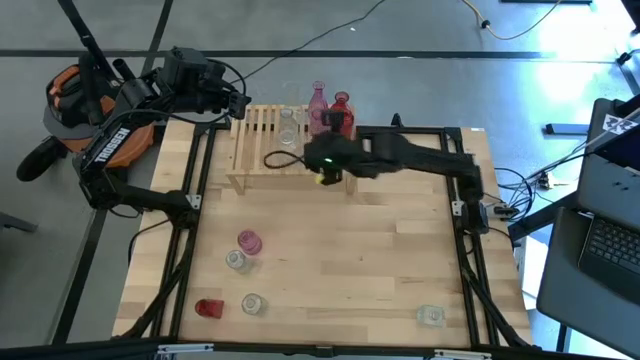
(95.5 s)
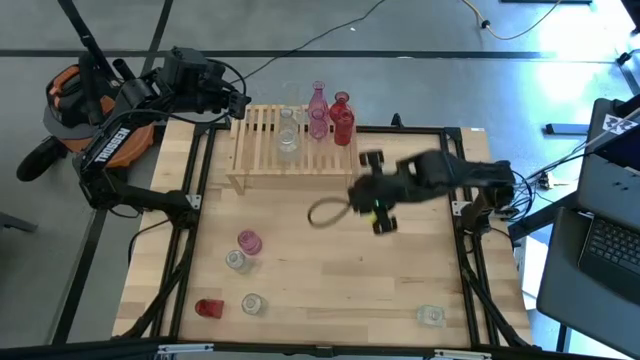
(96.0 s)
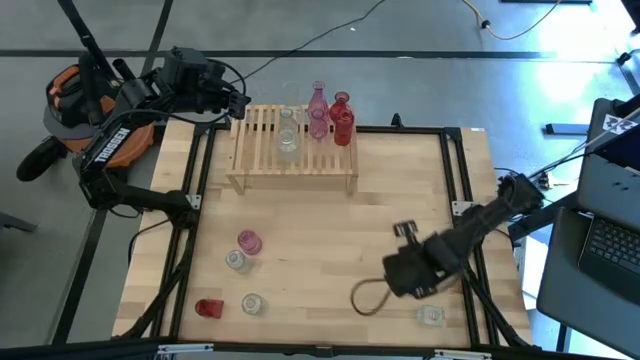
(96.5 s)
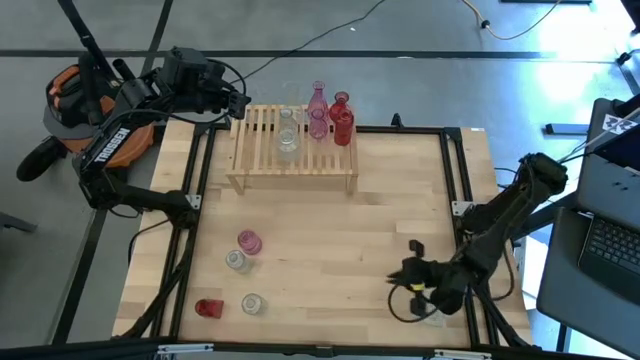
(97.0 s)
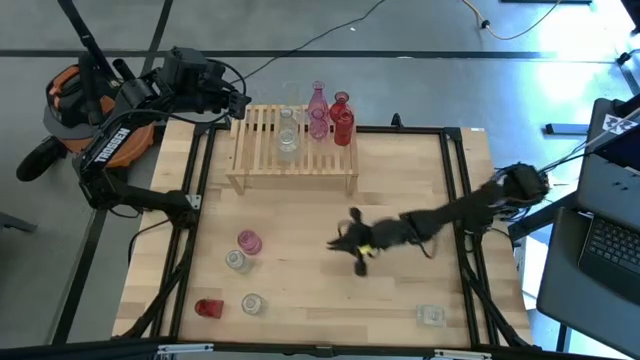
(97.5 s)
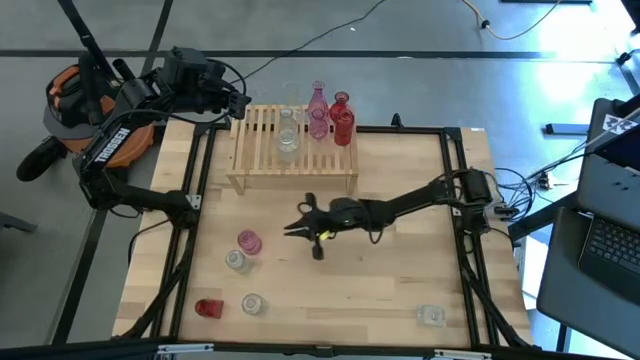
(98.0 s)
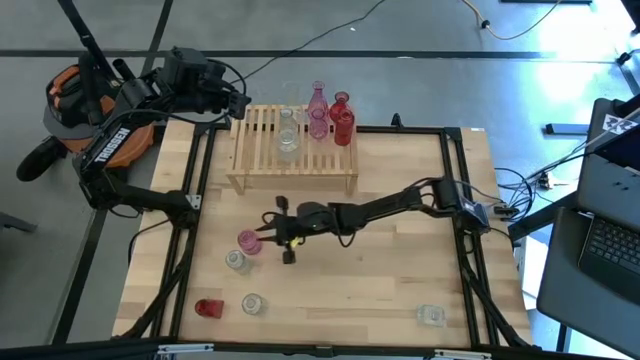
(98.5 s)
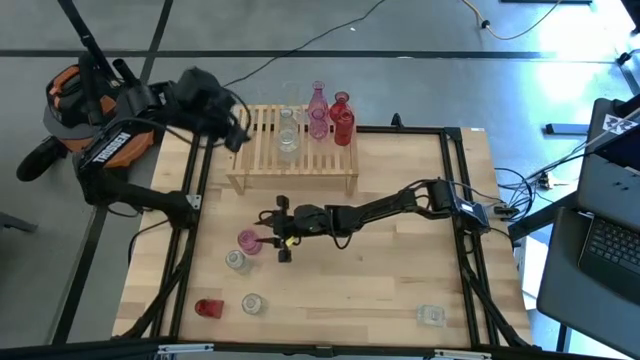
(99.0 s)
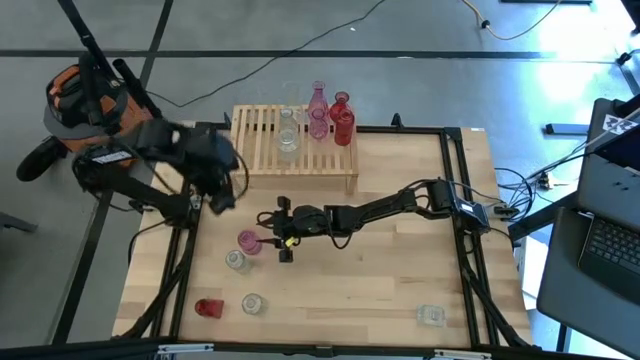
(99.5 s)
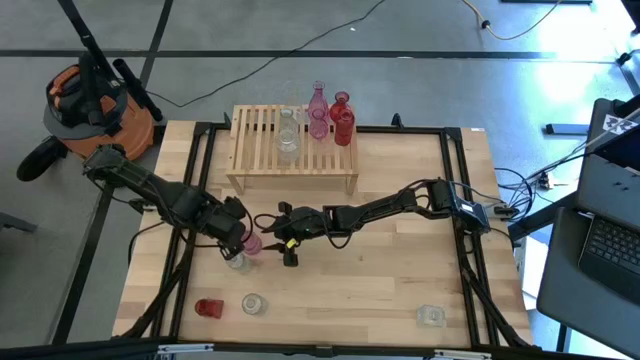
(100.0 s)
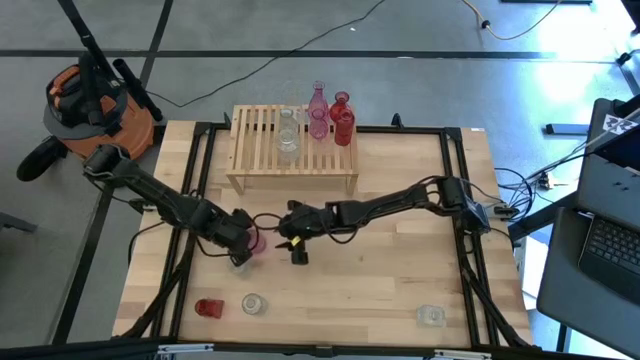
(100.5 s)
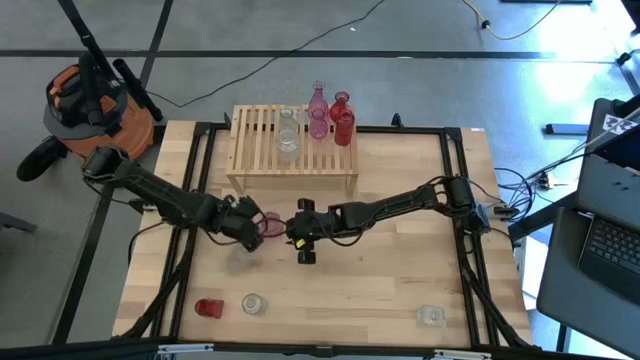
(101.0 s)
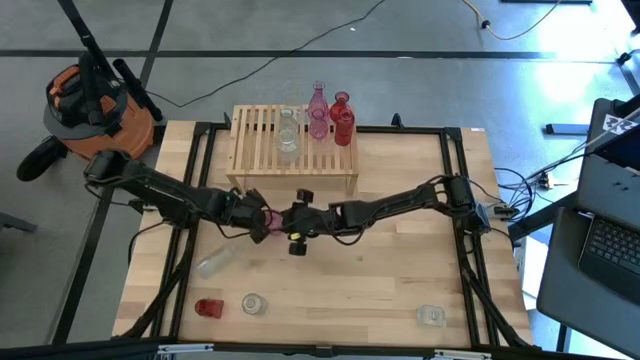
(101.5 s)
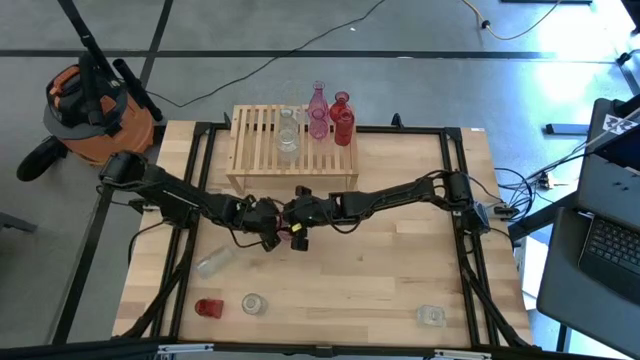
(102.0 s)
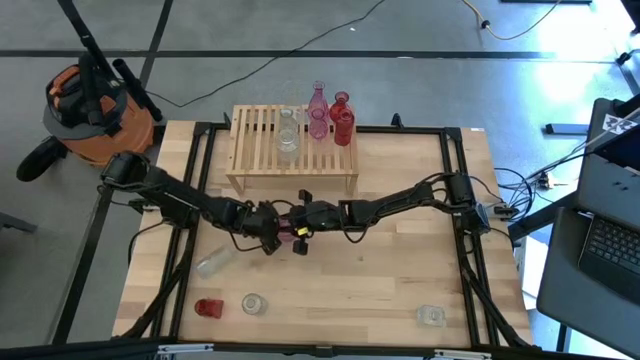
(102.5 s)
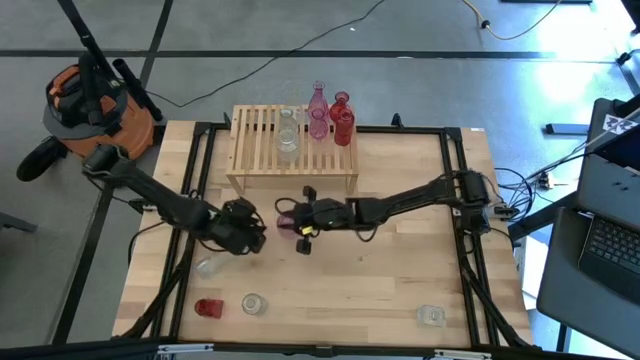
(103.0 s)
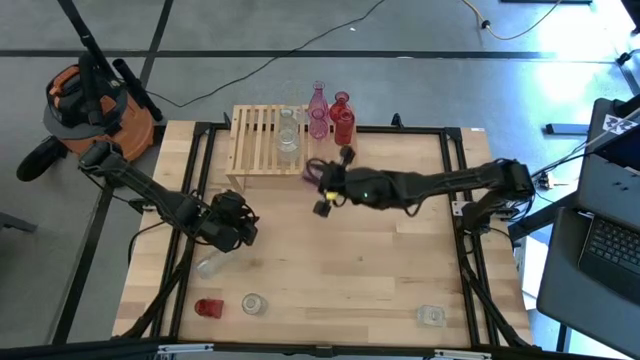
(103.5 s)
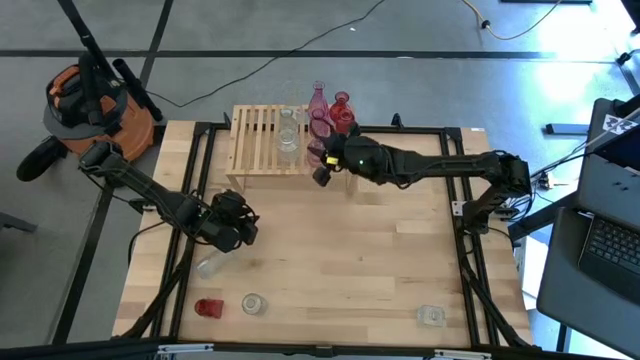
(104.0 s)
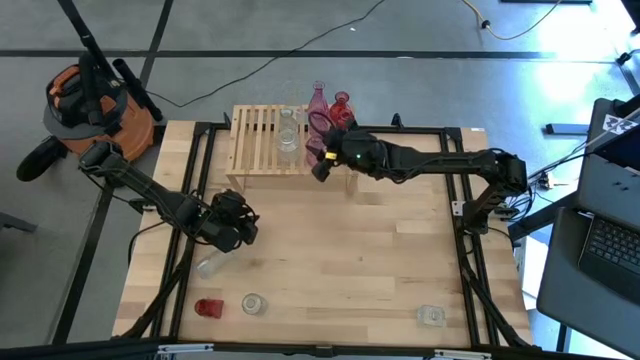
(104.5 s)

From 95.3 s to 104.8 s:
Task: sort vases onto shelf
Put the pink vase on the shelf aligned with the other pink vases

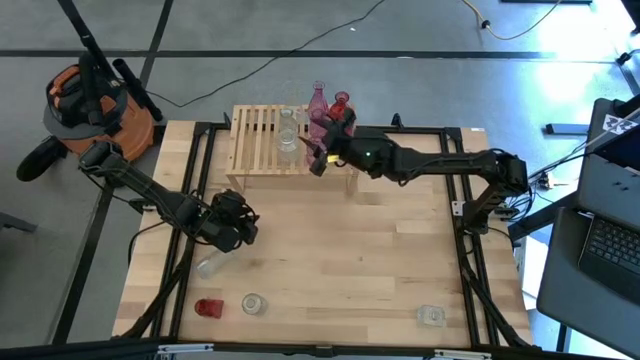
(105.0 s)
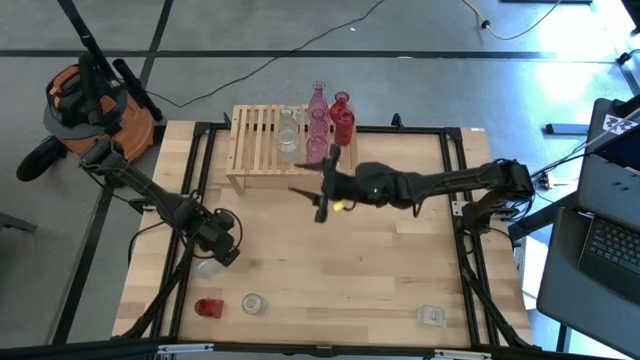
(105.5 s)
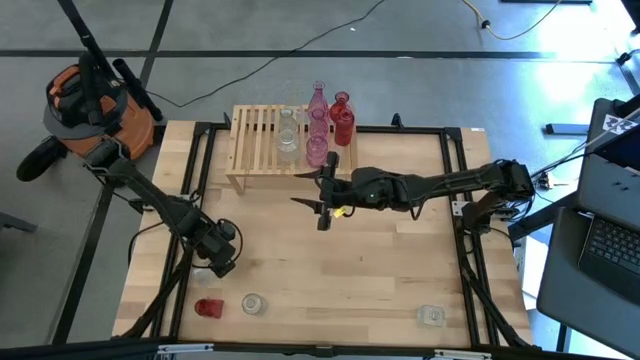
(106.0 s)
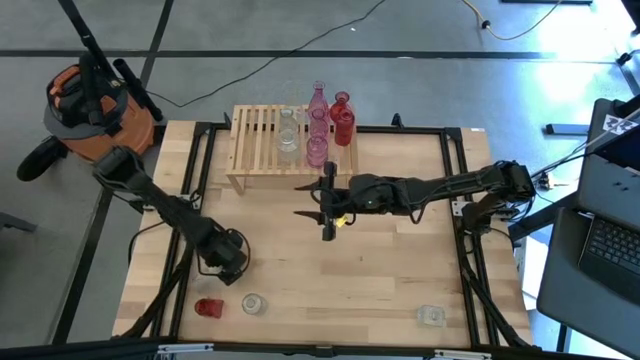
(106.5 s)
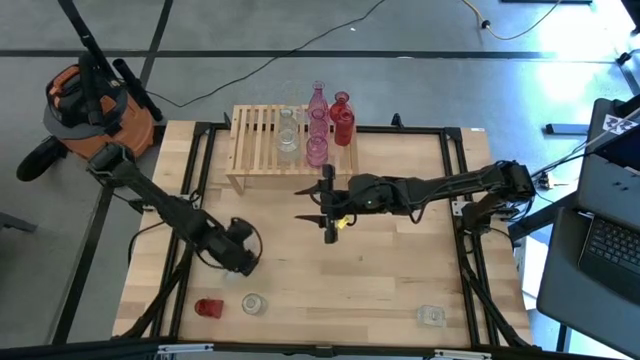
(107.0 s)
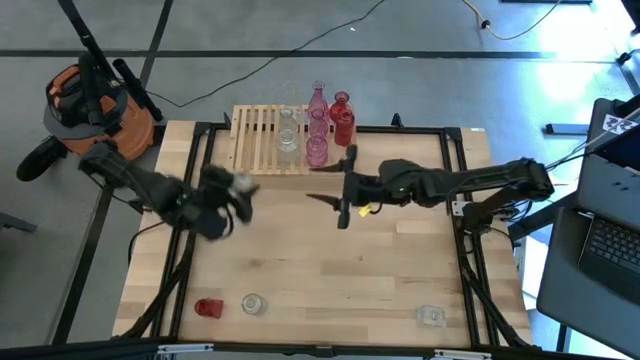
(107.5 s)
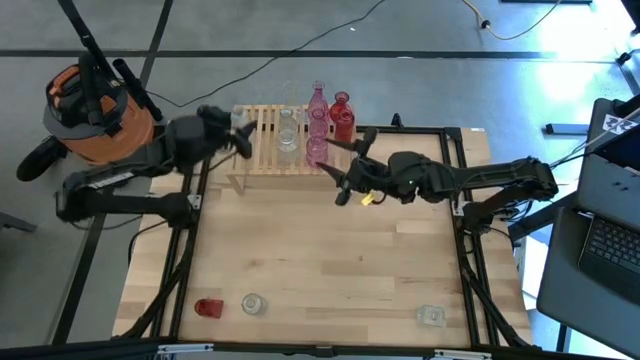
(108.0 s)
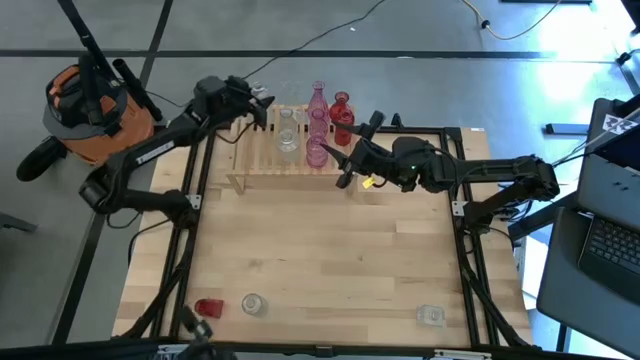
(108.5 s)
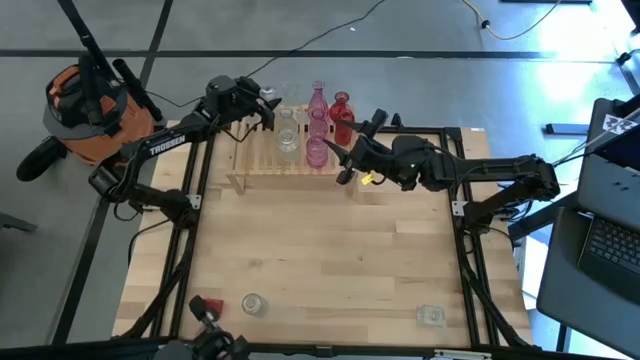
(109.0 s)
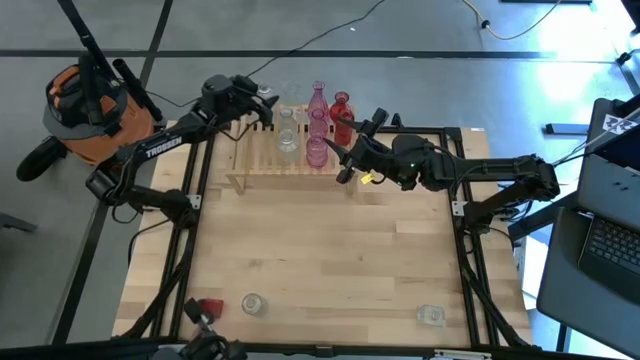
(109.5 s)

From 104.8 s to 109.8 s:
Put the transparent vase on the shelf

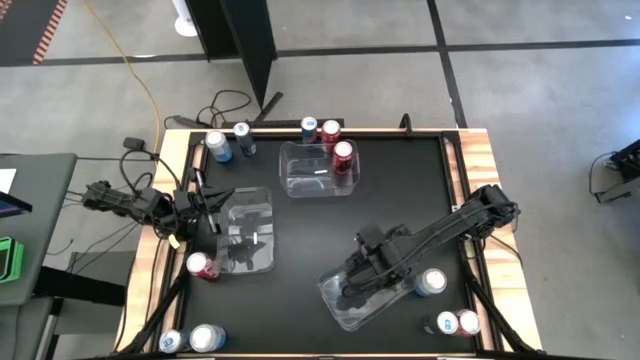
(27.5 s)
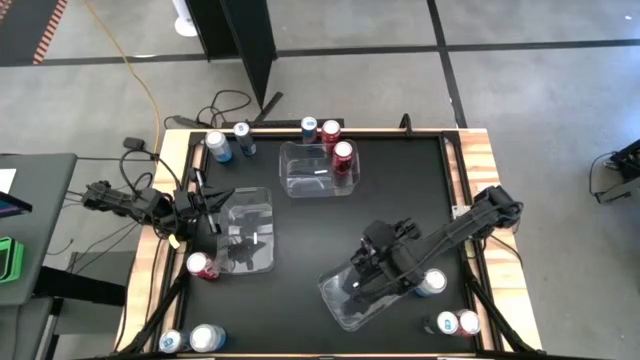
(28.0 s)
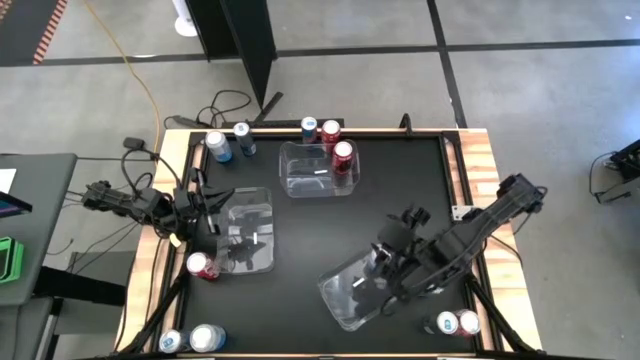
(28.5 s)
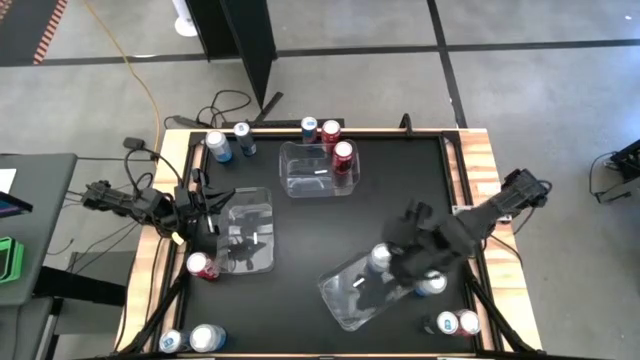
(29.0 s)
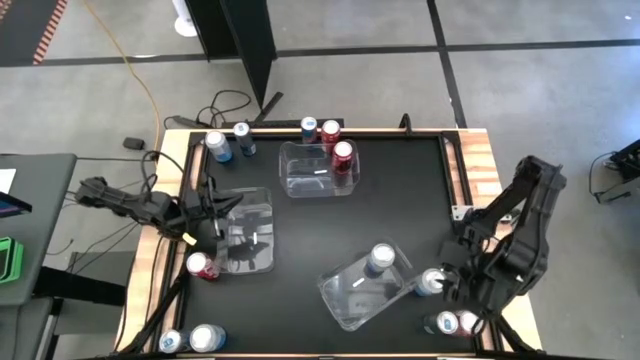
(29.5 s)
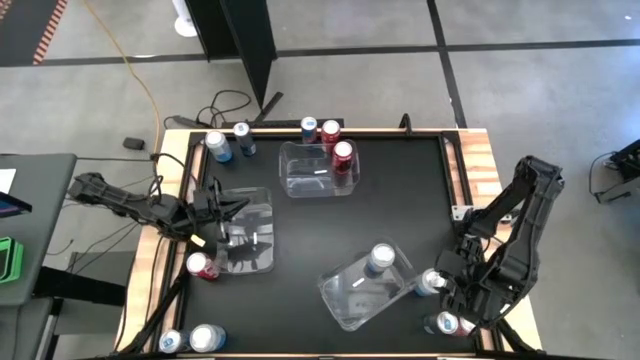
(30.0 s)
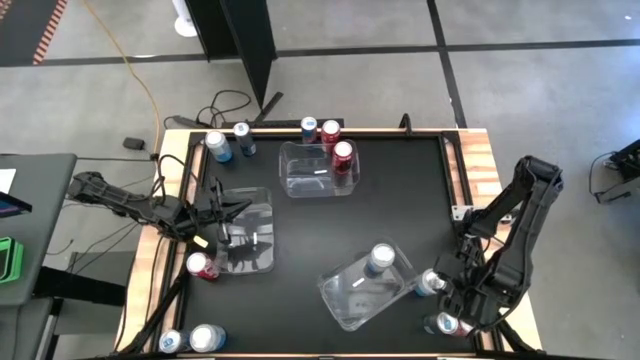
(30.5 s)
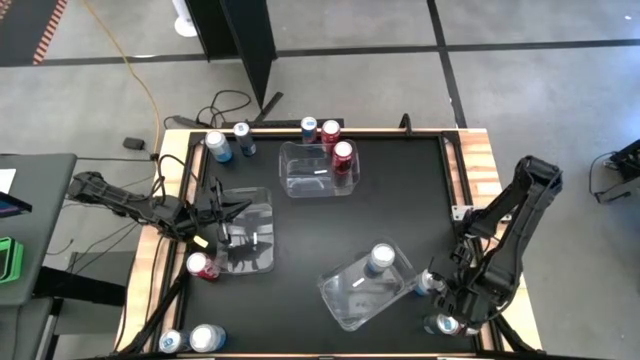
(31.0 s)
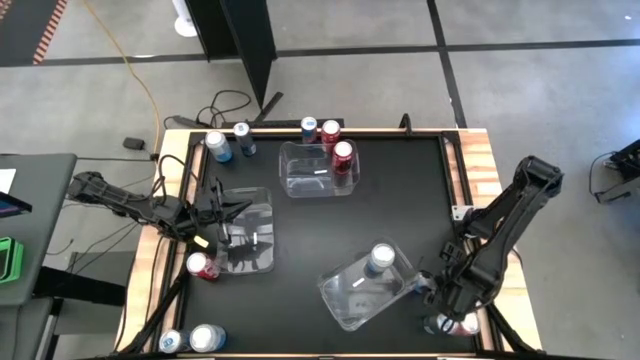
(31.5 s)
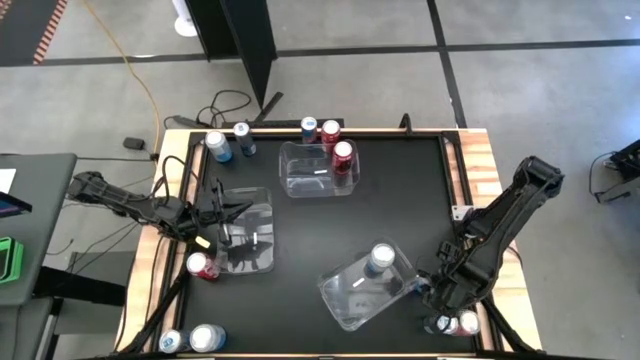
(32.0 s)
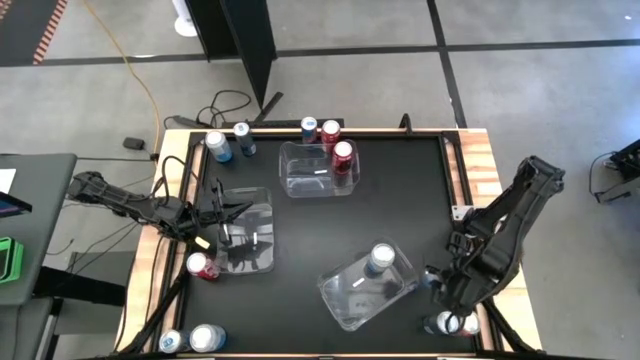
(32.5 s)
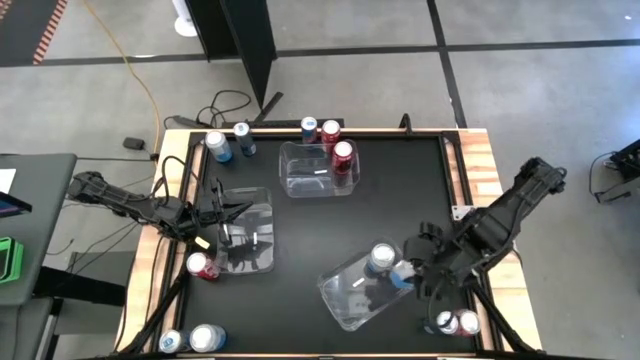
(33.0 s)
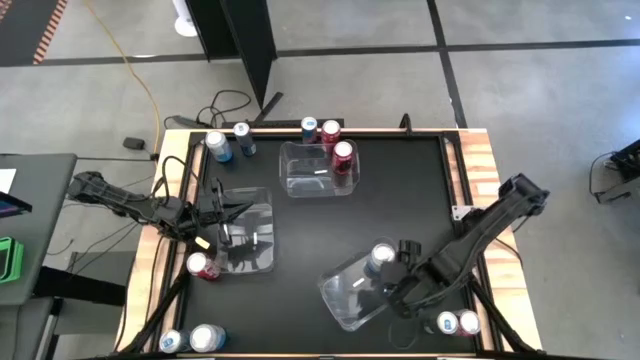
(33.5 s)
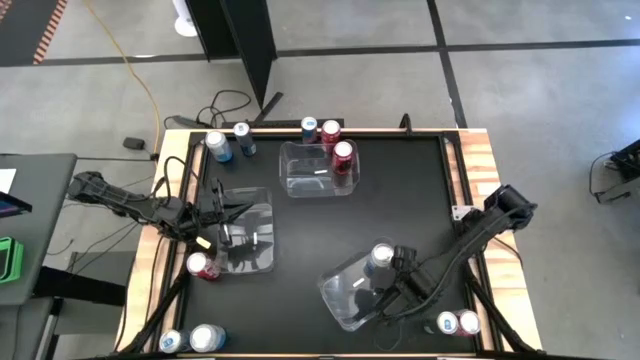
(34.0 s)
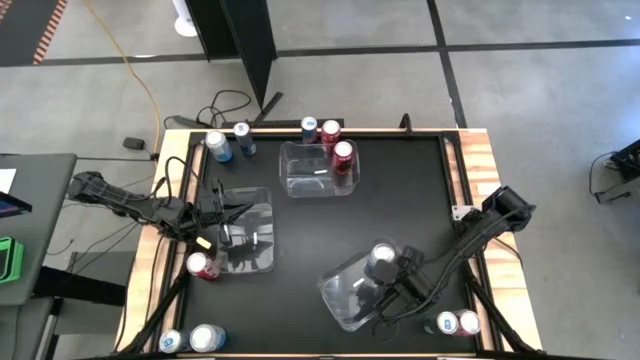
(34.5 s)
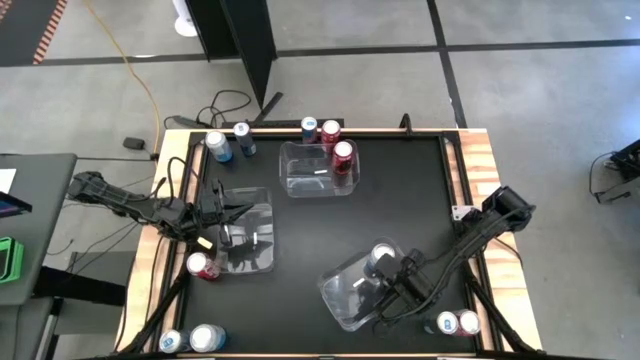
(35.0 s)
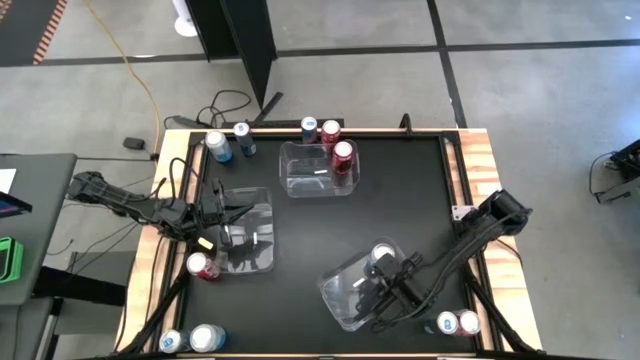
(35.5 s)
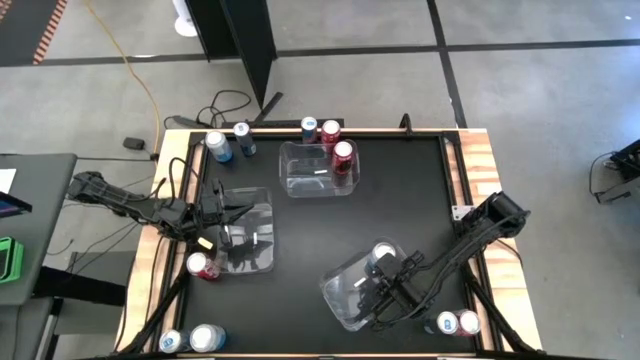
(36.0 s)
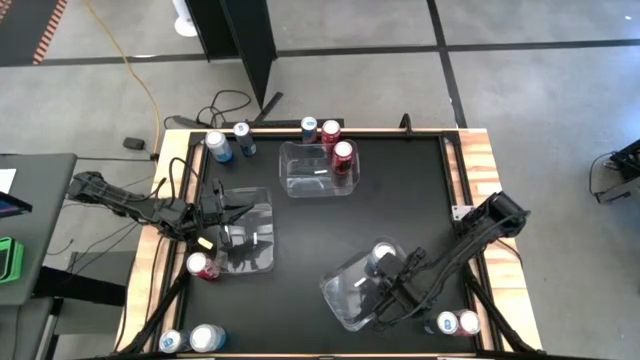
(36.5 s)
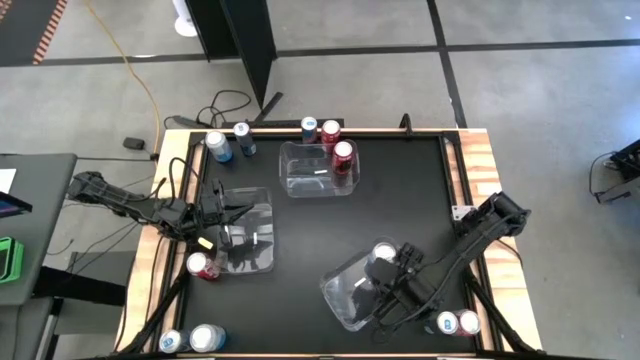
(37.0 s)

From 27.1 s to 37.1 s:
Task: Sort soda cans
Put the blue-white soda can into the bottom transparent bin
